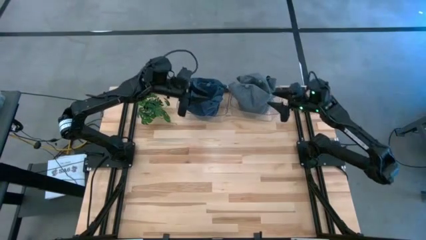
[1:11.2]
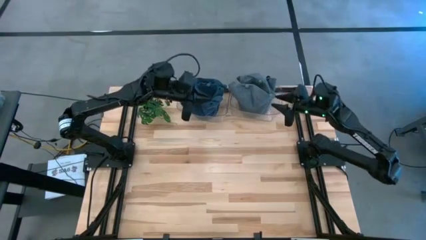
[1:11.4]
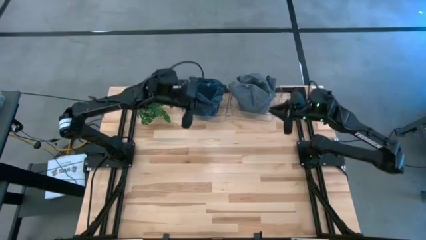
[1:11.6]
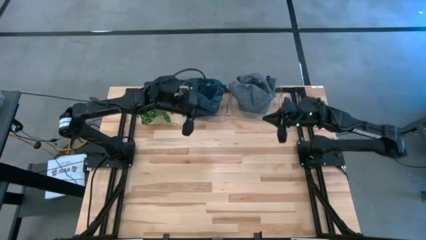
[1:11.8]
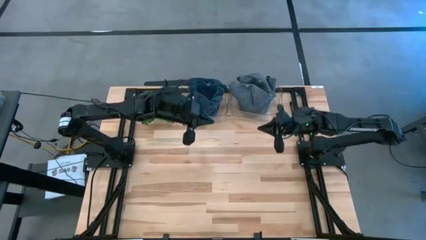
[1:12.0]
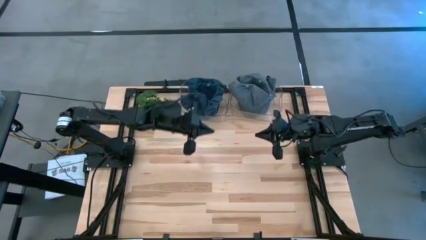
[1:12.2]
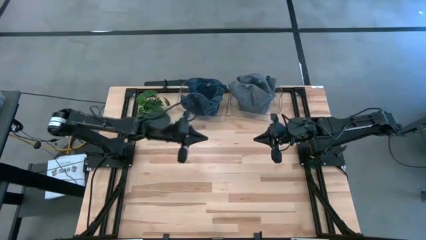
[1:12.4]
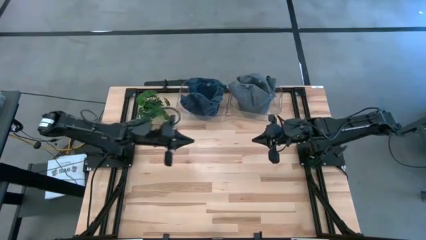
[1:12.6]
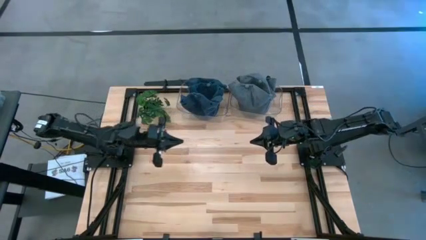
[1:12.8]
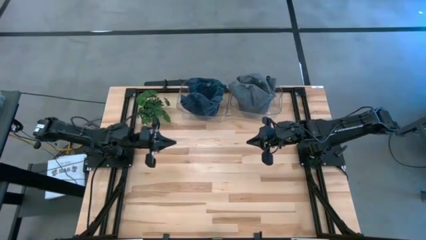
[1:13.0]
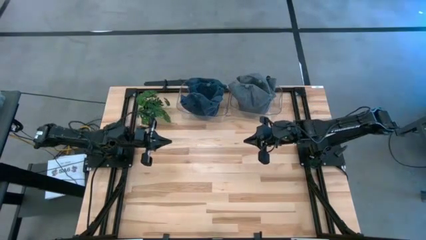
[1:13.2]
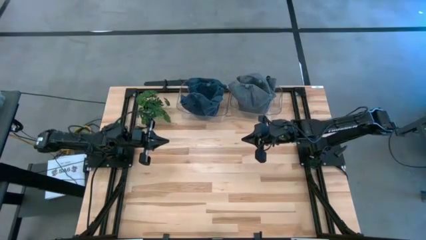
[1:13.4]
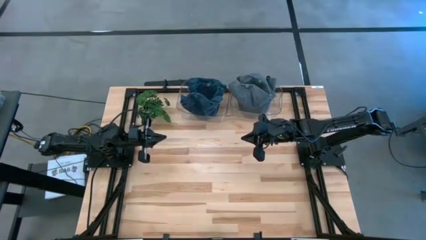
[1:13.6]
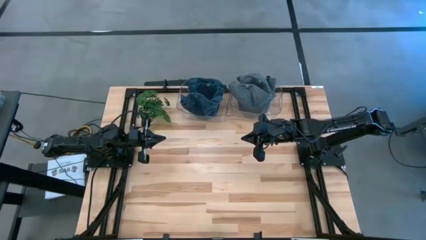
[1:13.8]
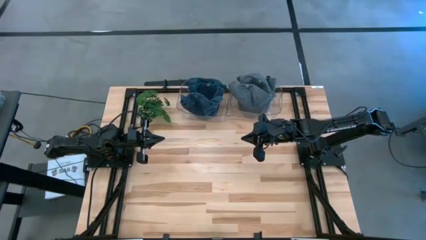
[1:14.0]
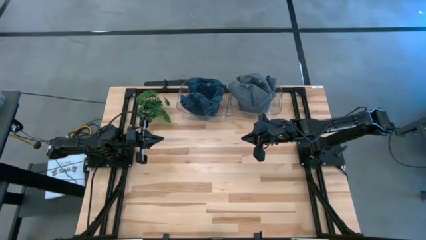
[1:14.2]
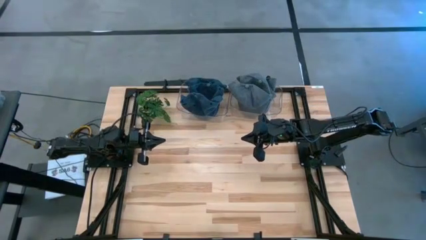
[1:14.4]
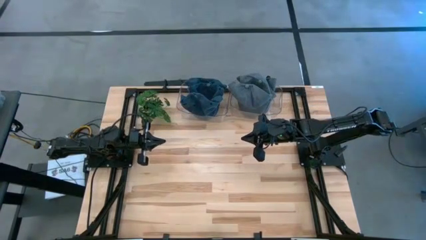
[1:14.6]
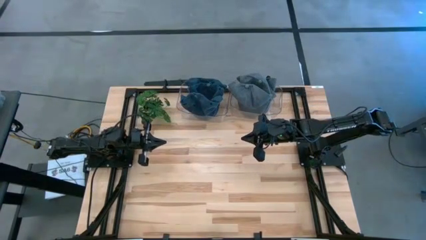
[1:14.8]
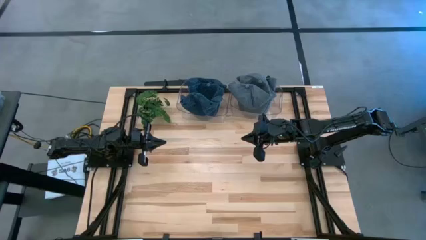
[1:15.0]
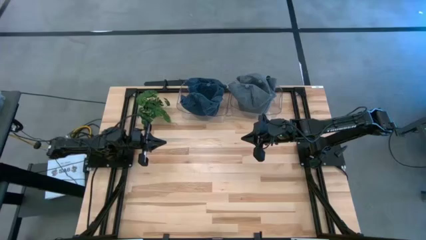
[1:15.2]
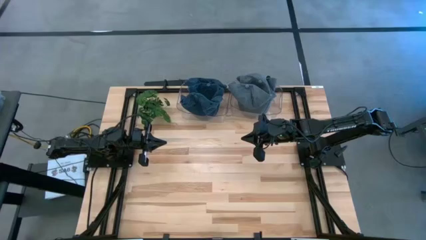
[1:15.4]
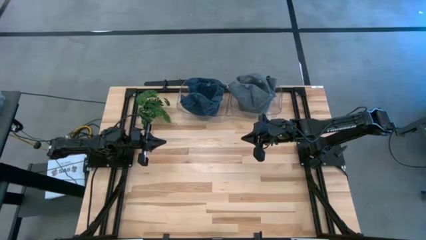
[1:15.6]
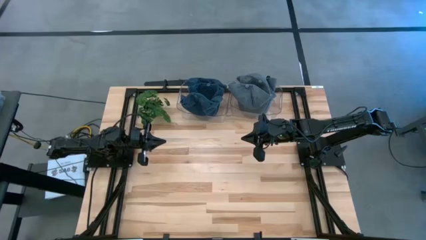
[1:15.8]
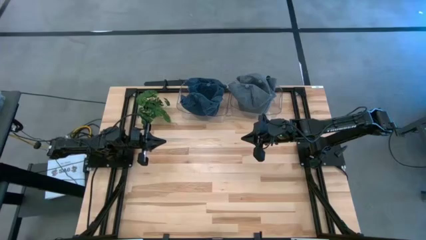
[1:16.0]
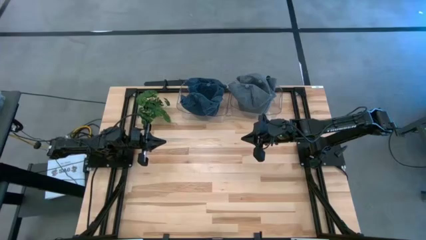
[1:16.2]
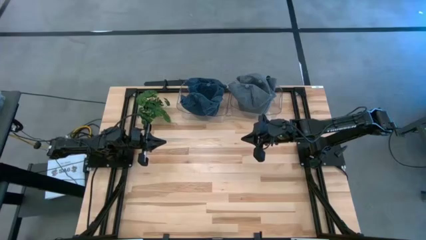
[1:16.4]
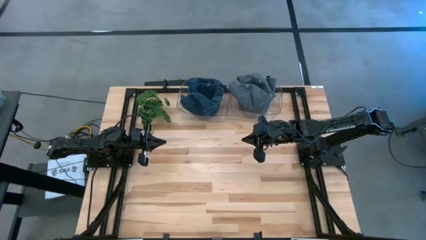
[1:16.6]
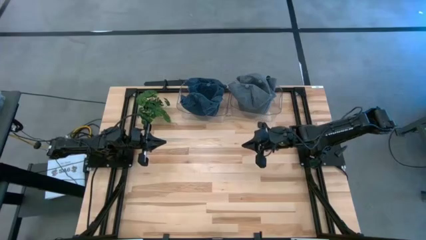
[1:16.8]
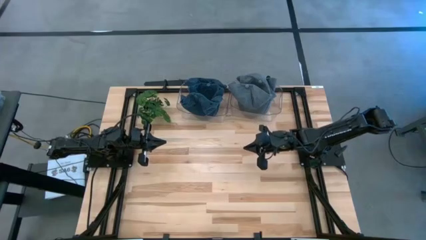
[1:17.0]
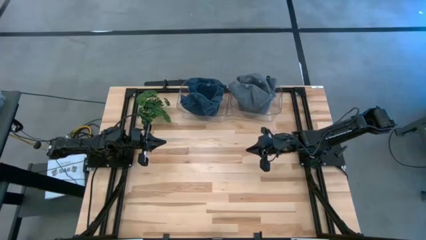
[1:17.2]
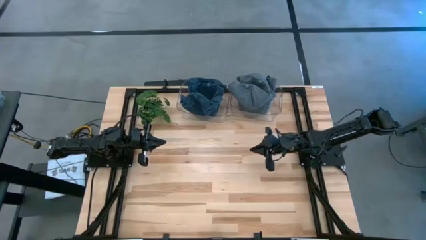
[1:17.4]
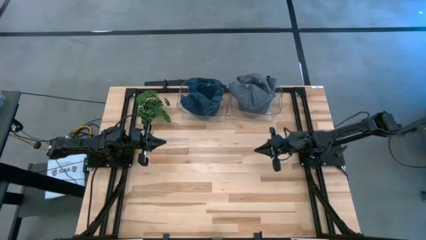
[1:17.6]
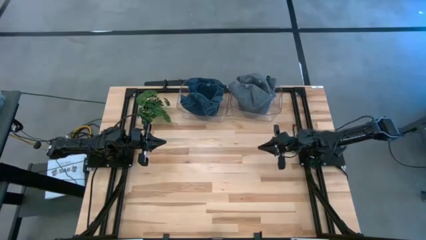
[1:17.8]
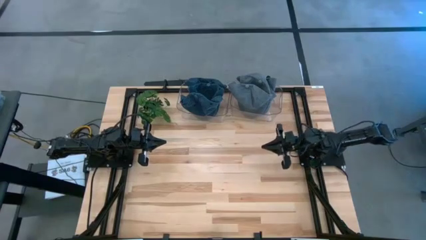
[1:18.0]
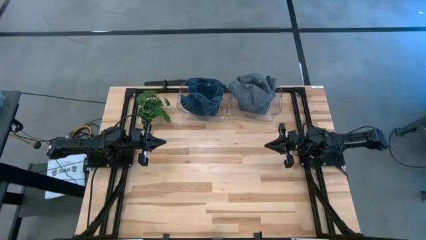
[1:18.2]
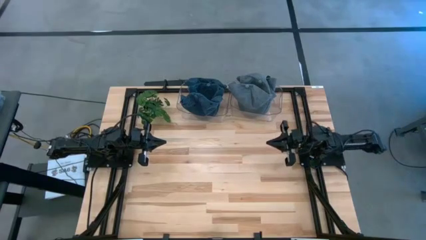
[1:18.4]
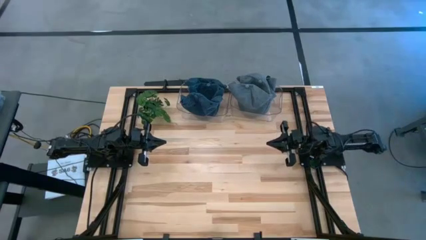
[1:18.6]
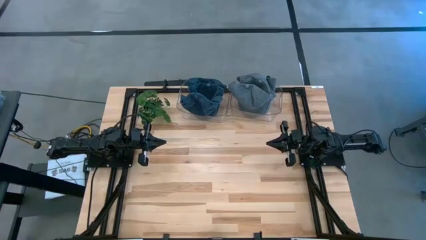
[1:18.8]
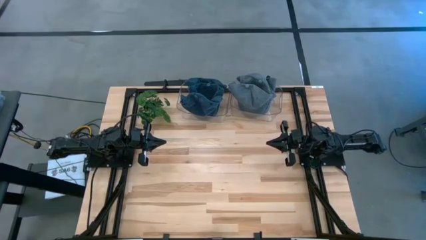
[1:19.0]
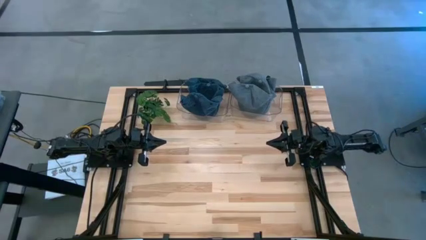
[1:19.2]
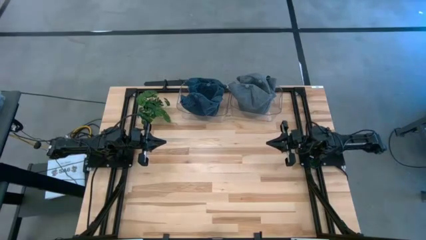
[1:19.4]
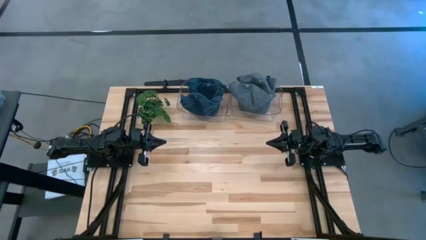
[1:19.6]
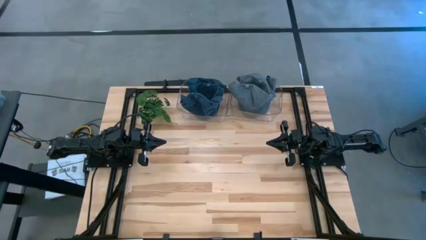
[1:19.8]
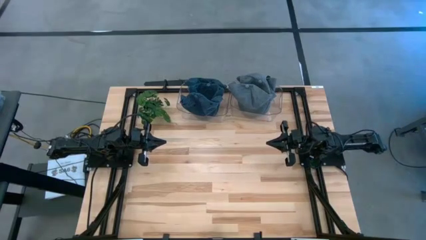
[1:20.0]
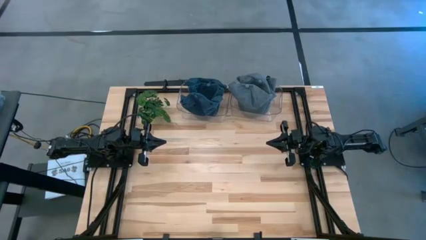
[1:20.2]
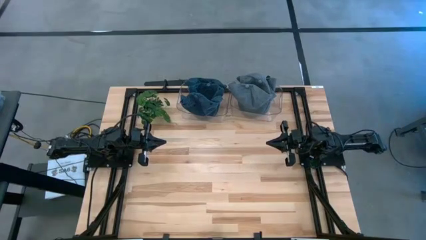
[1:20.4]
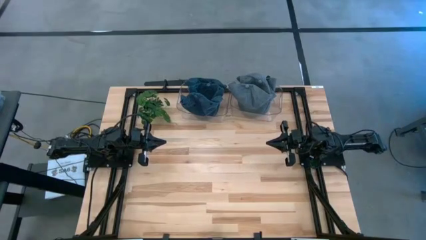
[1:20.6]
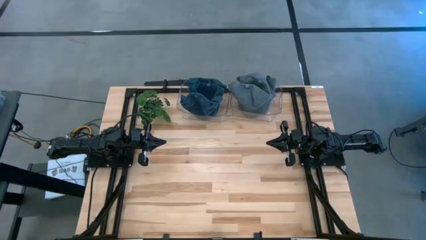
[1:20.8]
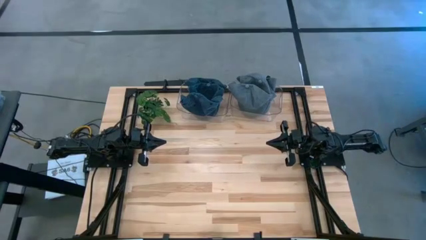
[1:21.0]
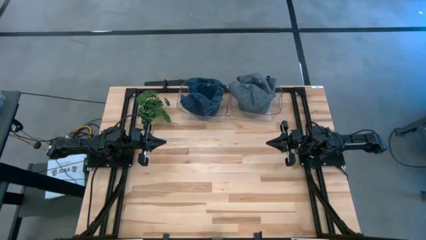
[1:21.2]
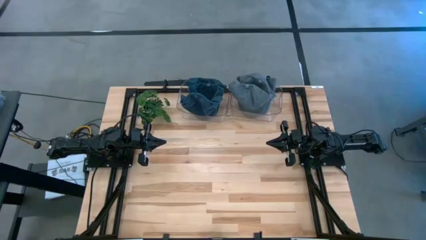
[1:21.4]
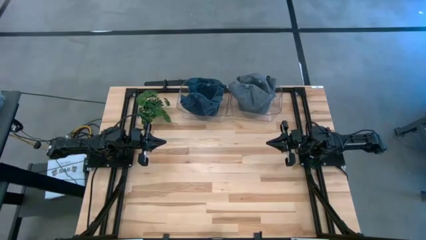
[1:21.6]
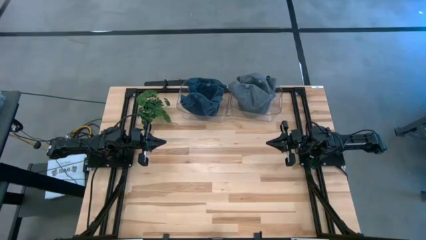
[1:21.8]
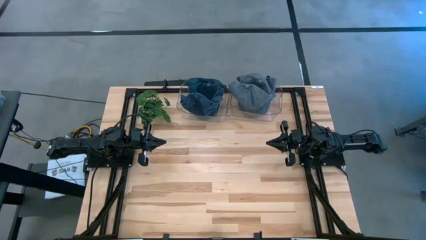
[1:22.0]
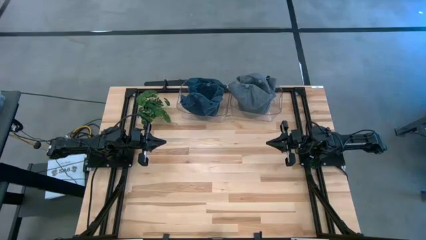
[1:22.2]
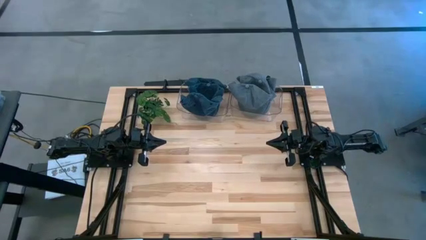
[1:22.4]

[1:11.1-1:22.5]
Task: Pick & Place hat
Return to Home Position
